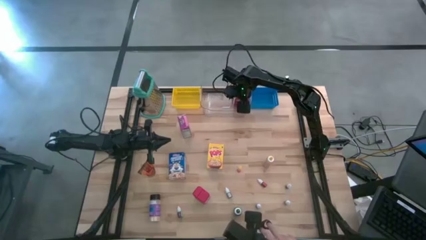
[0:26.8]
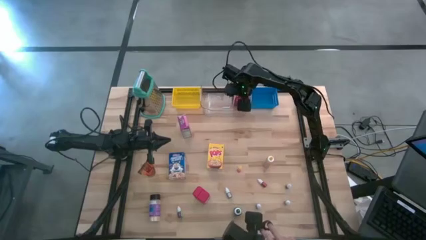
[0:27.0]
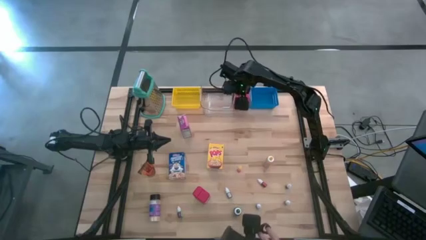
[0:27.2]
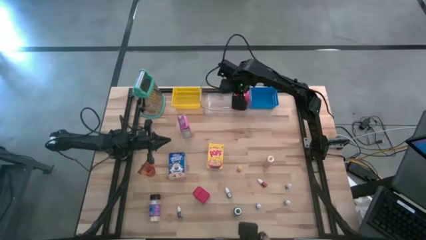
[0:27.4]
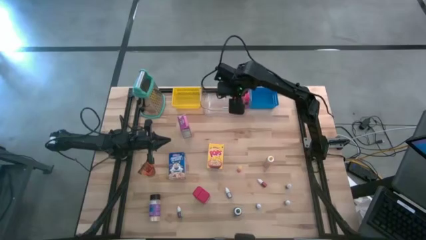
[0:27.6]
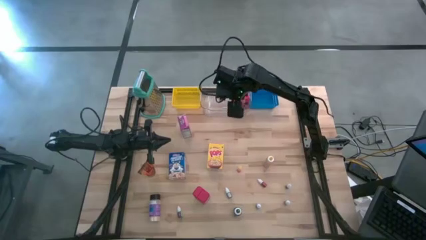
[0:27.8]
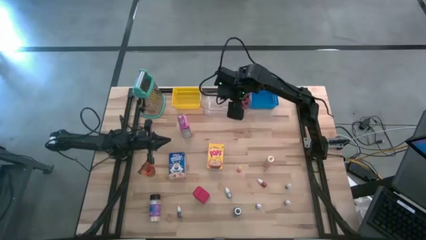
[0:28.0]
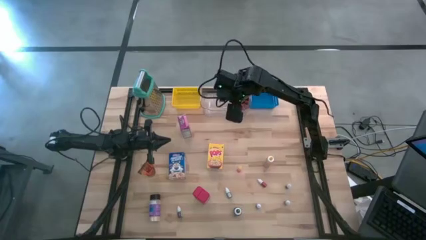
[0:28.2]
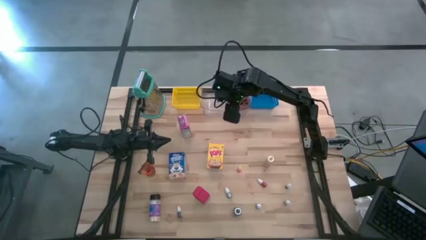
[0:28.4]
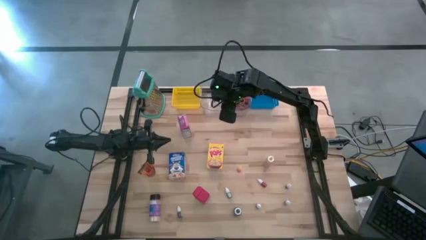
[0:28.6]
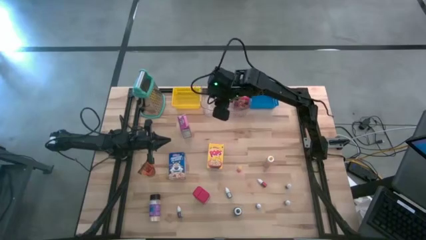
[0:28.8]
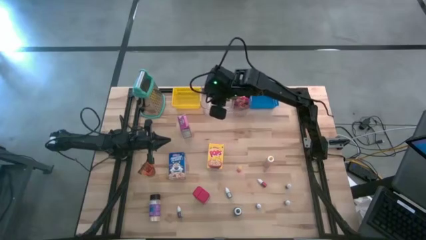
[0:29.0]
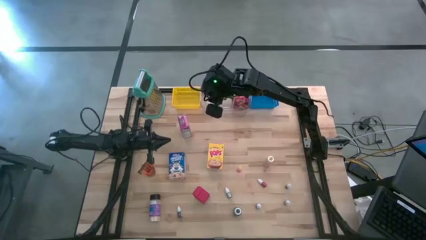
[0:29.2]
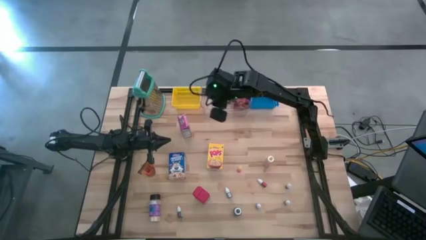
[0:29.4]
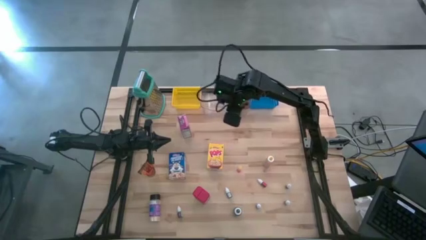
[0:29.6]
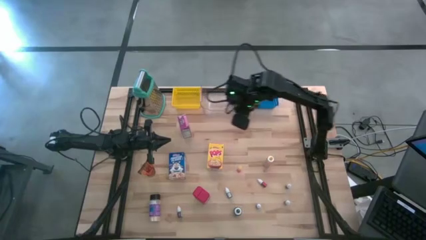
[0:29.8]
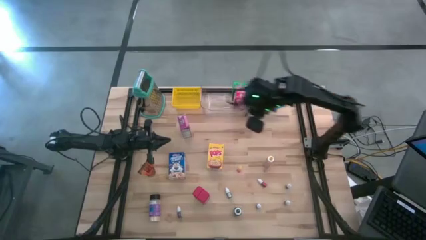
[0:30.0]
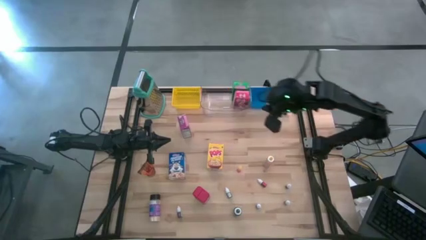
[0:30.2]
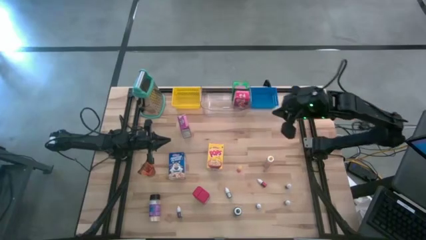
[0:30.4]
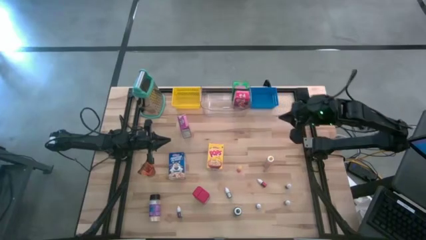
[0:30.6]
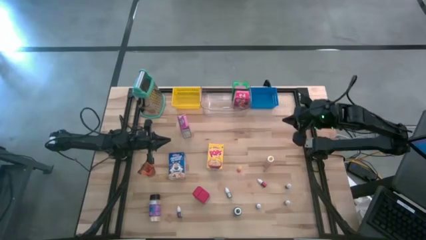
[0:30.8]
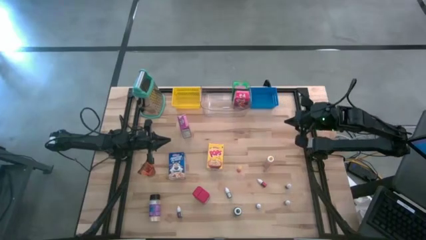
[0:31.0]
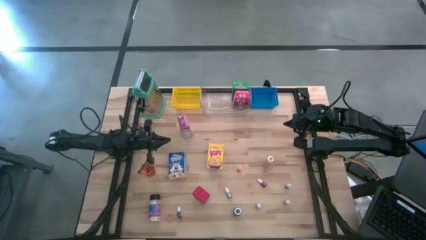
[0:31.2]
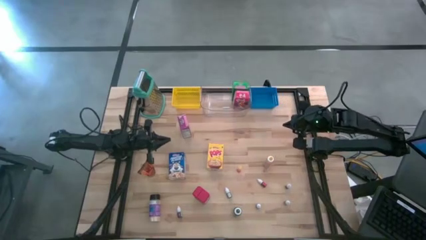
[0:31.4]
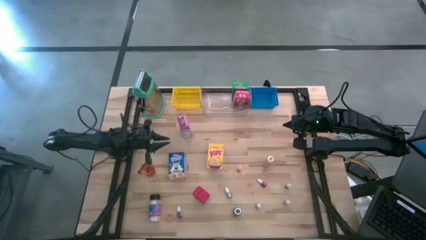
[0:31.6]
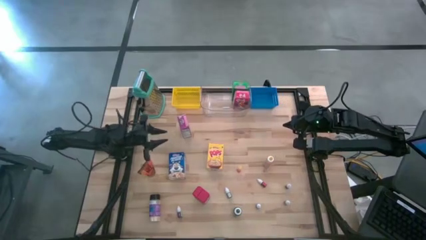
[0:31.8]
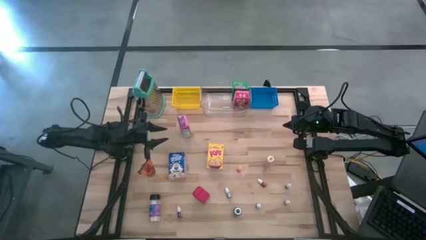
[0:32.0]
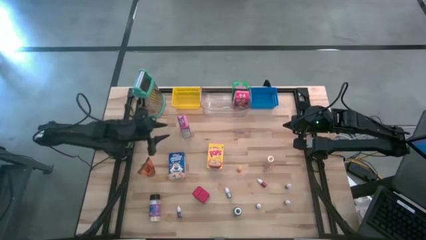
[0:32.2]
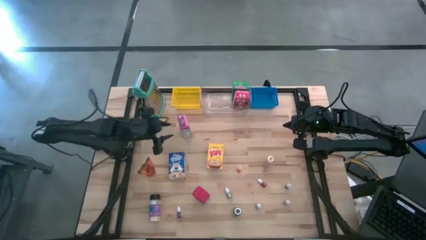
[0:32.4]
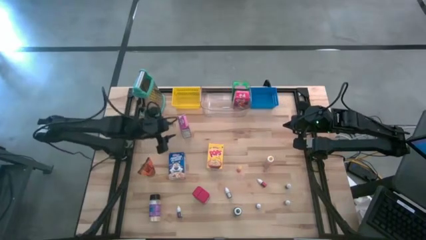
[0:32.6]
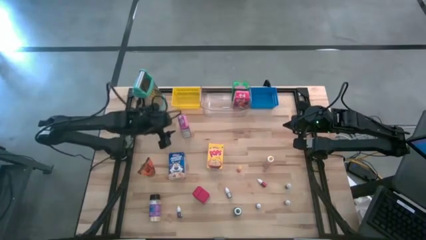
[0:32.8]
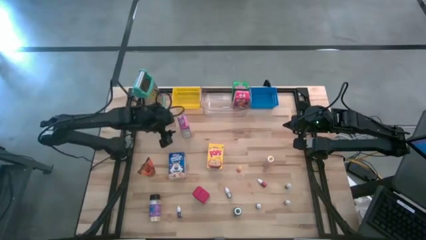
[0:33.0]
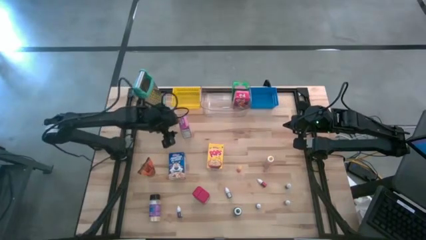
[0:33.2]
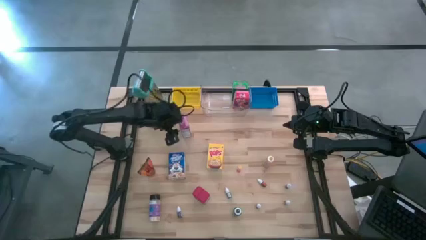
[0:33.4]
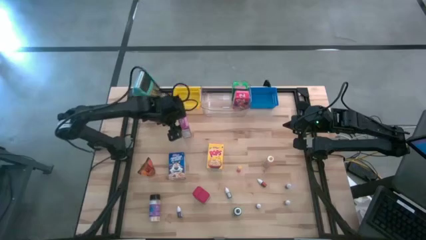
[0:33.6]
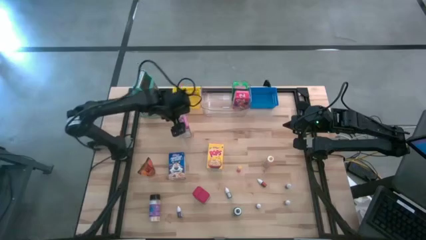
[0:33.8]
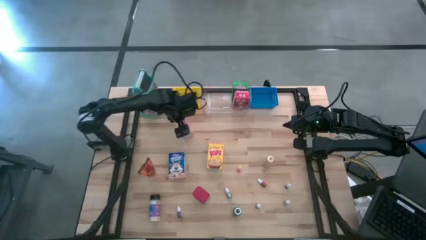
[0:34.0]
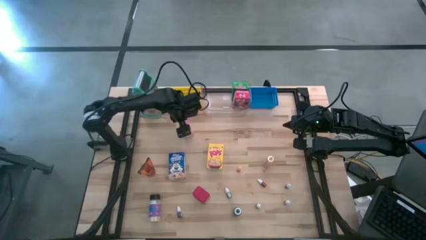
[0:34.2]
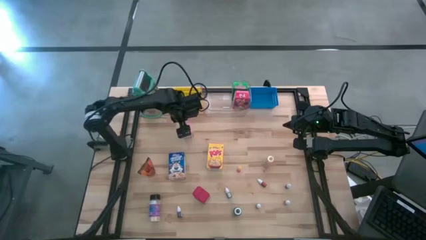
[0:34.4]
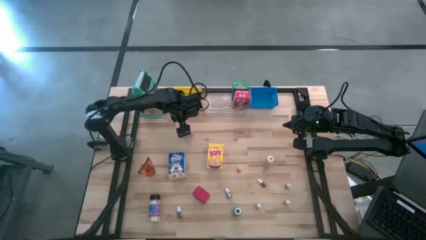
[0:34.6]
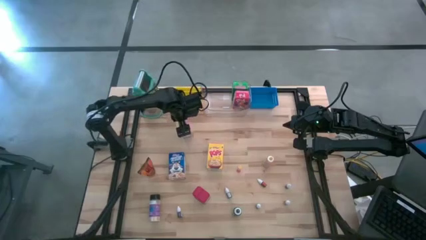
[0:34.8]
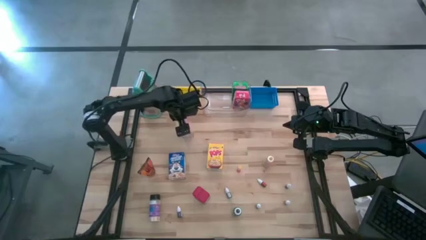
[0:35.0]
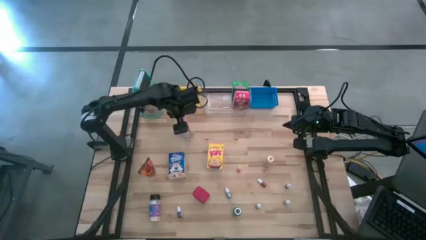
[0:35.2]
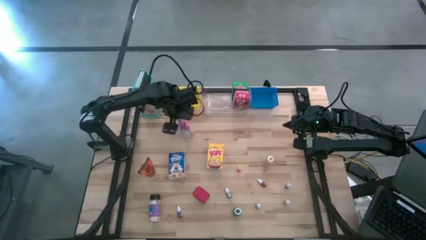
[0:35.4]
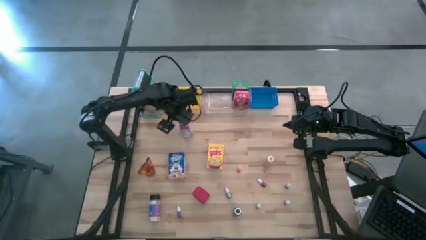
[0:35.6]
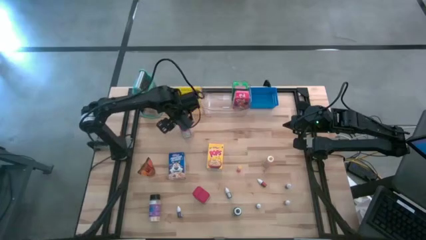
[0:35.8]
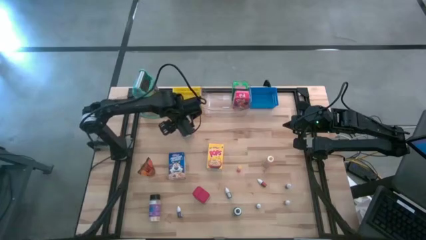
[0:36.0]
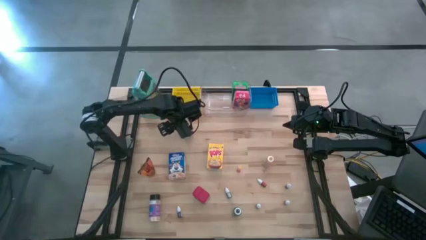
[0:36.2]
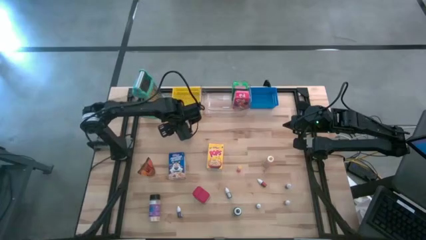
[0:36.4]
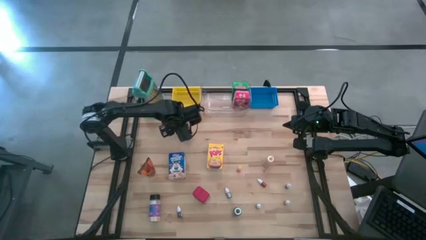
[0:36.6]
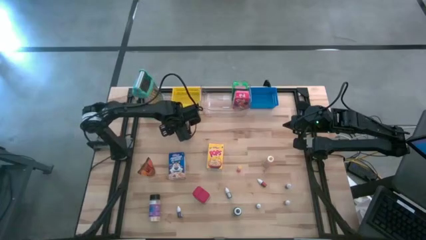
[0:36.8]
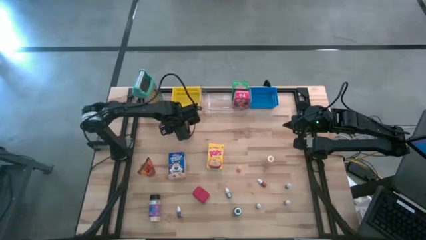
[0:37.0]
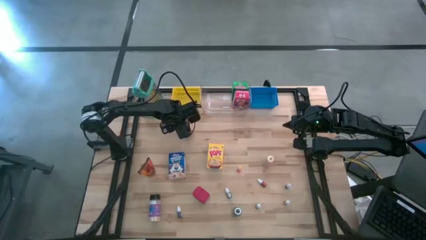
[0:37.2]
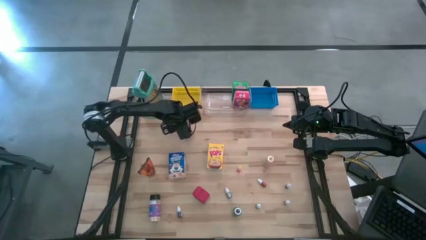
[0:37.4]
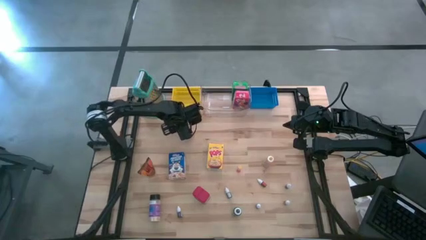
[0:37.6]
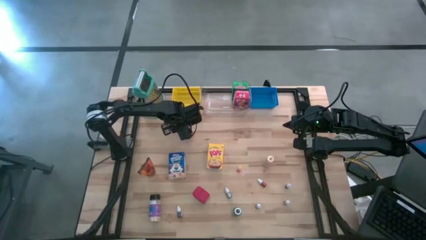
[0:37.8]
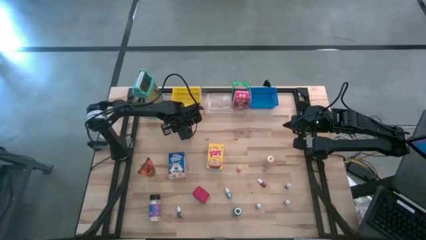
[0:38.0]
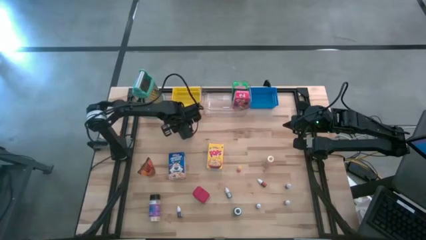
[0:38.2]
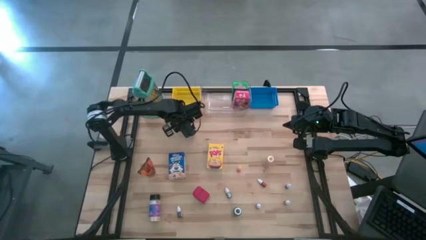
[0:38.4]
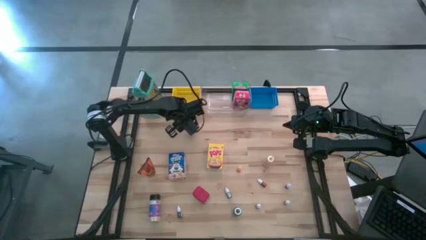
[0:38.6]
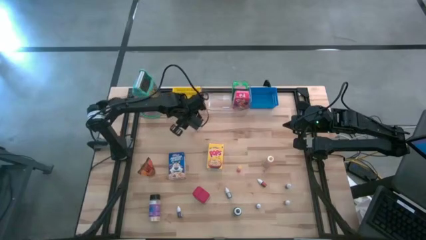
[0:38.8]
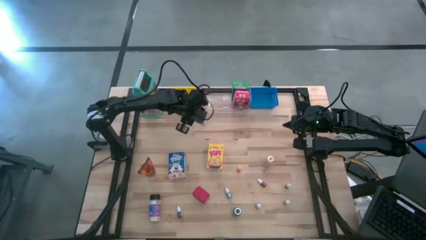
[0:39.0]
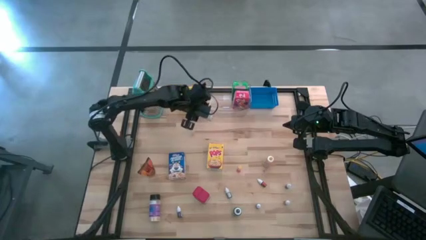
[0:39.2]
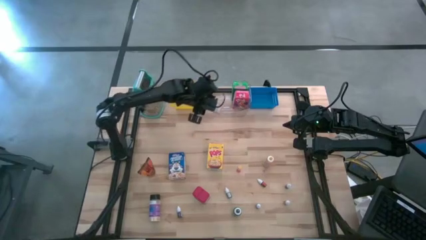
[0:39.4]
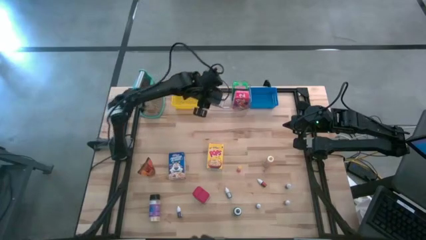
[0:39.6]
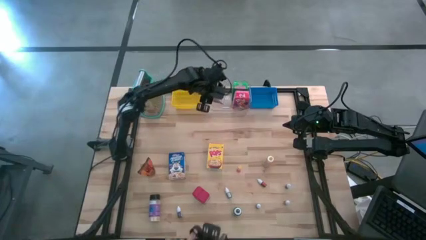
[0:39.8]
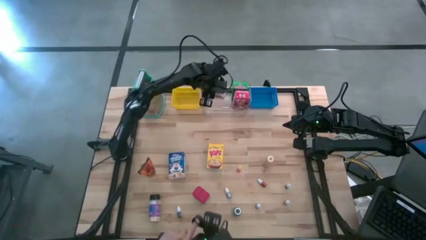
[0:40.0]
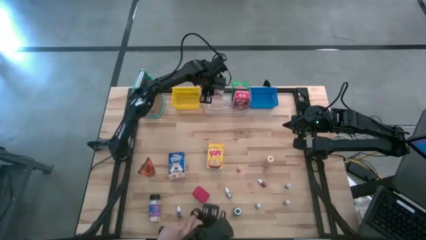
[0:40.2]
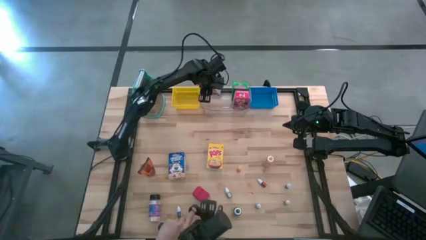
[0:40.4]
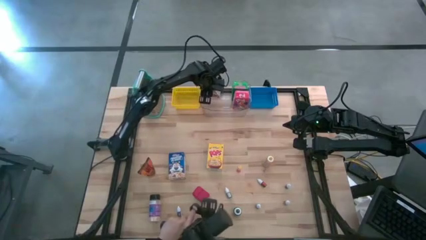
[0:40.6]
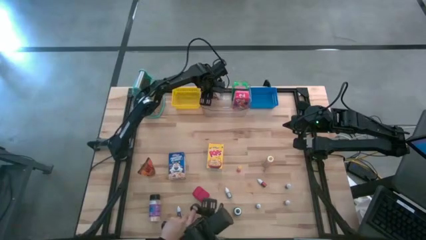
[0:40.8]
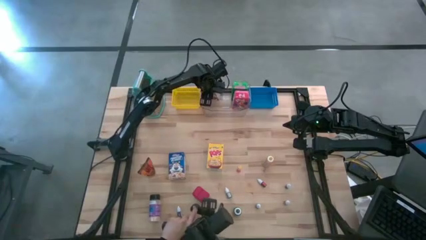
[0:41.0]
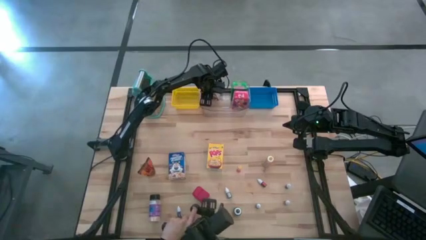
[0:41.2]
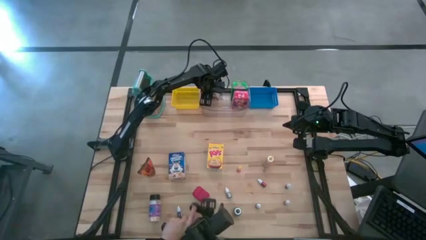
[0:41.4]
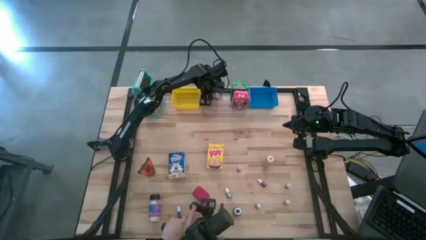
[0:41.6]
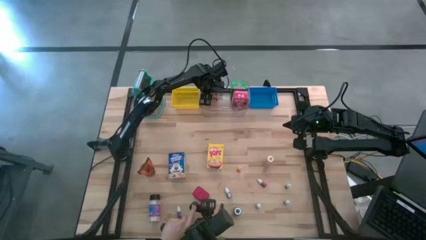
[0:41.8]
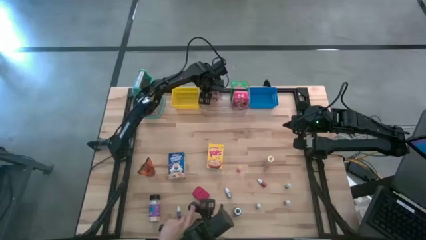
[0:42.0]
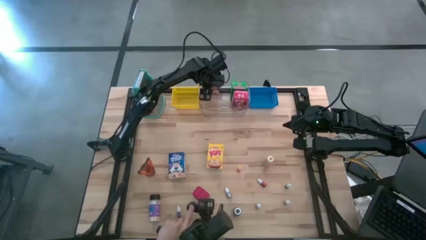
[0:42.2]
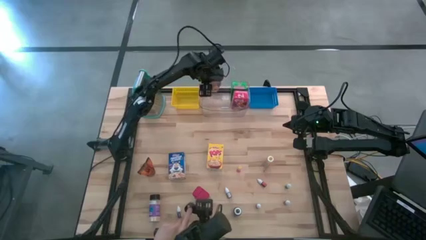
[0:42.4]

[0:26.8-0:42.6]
Task: Pick & Place Kitchen Items
Put the purple cereal box into the transparent bin
